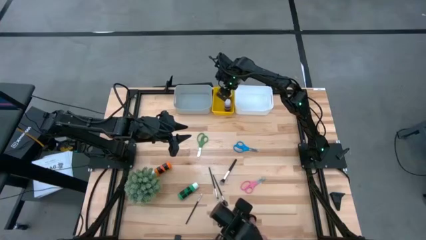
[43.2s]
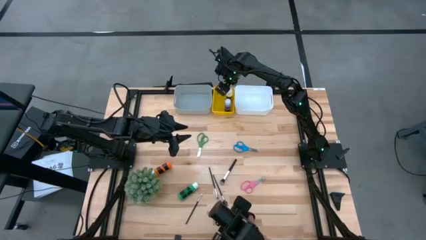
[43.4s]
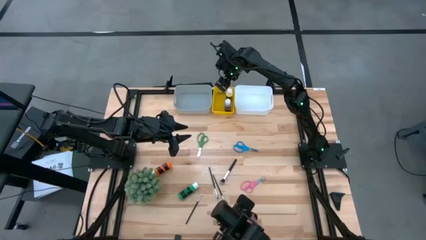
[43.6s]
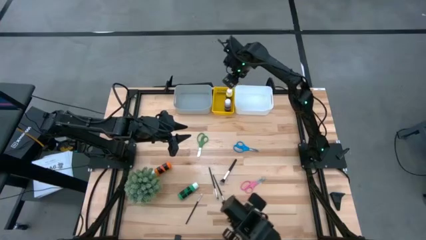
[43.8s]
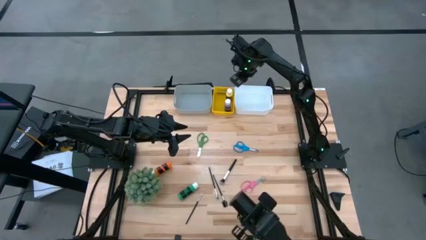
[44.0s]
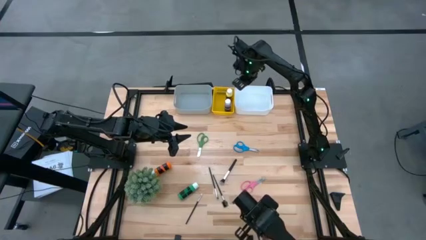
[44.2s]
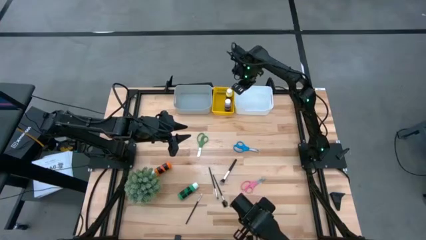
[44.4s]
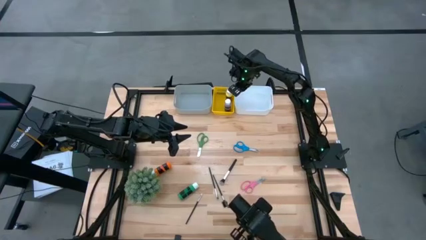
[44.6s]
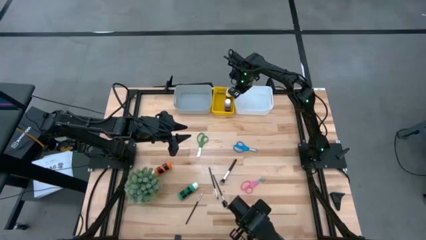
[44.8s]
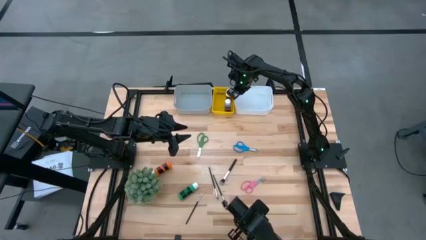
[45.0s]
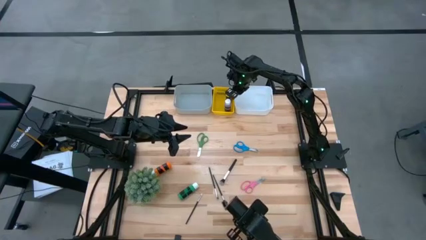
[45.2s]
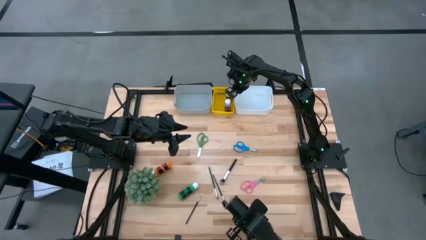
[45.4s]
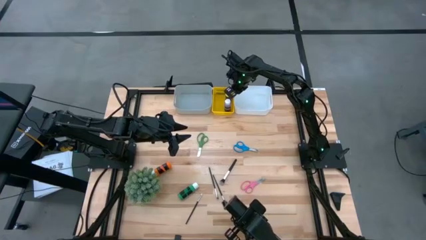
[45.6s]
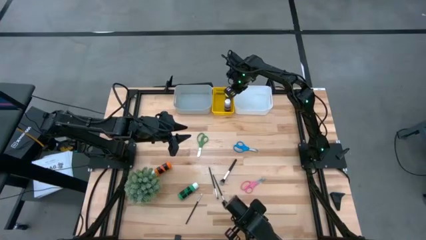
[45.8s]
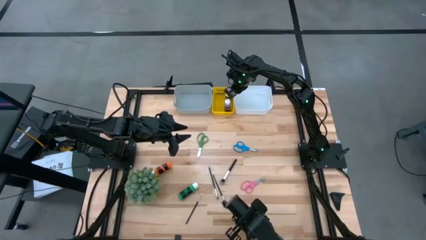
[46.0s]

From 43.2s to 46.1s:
Task: Pick & Place Paint Supplies
Adjust the white bin

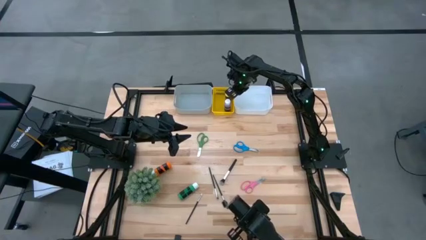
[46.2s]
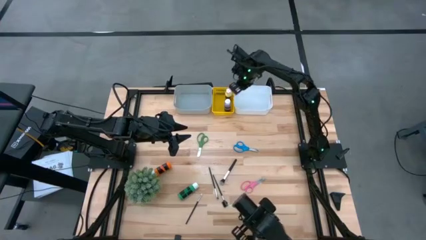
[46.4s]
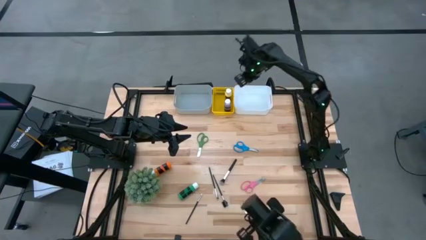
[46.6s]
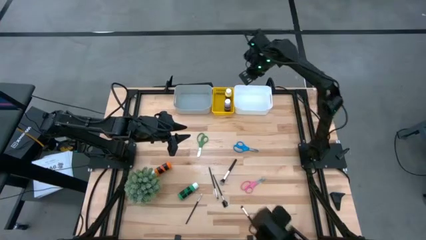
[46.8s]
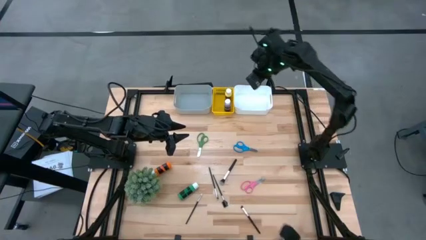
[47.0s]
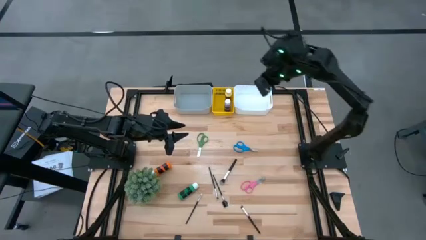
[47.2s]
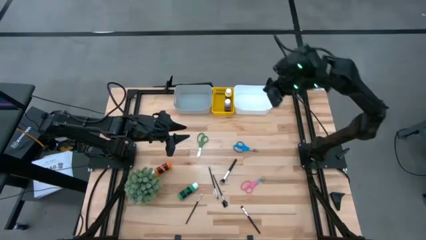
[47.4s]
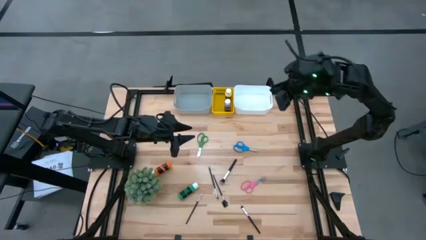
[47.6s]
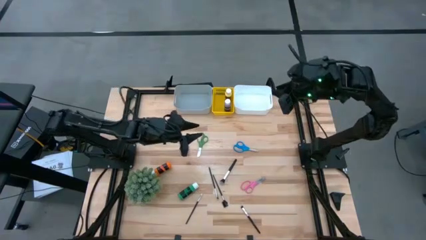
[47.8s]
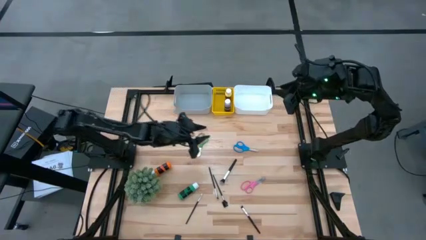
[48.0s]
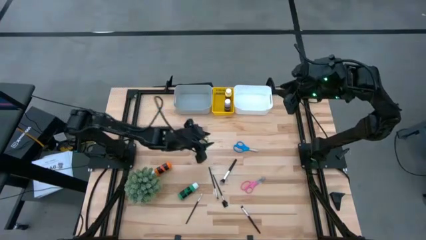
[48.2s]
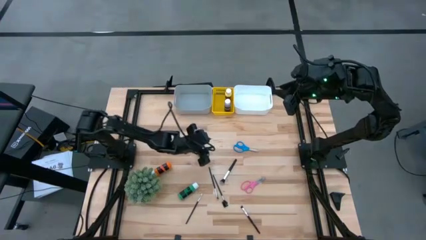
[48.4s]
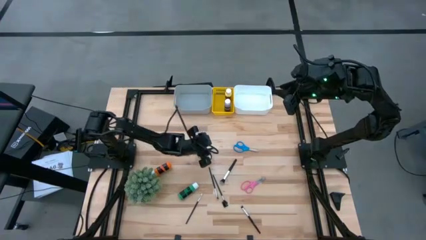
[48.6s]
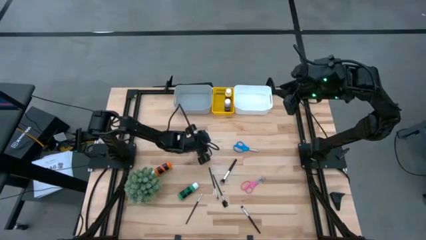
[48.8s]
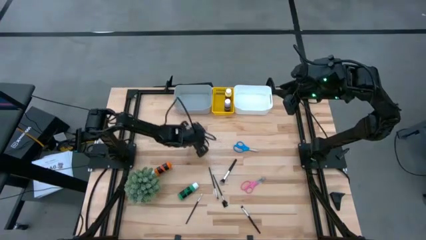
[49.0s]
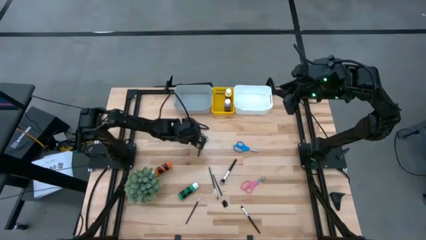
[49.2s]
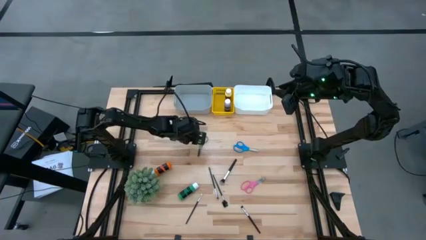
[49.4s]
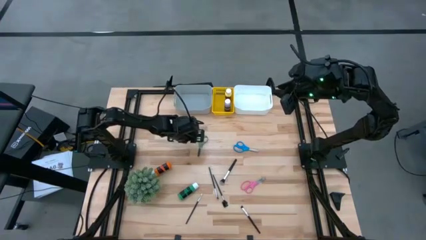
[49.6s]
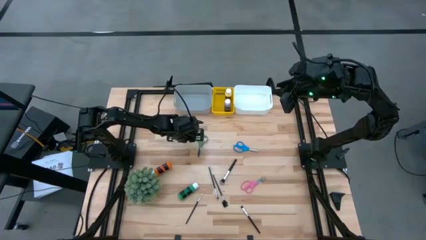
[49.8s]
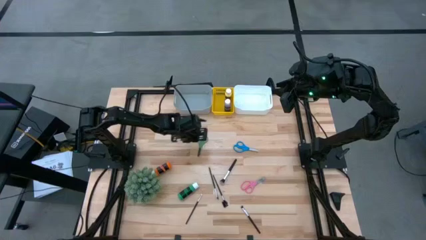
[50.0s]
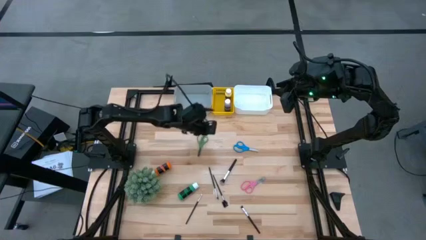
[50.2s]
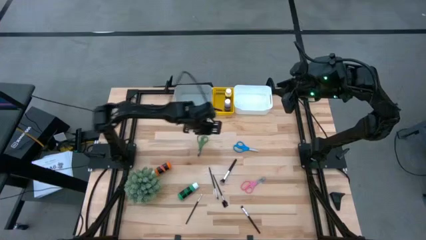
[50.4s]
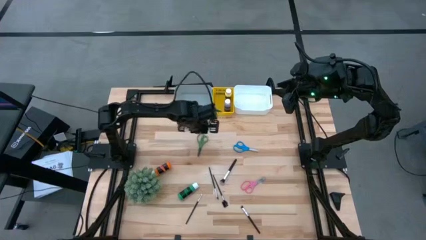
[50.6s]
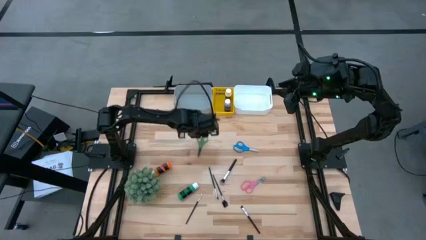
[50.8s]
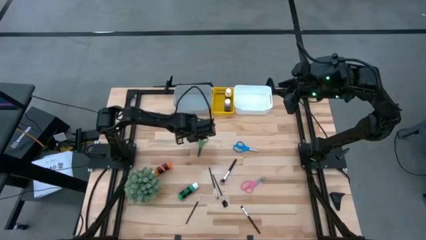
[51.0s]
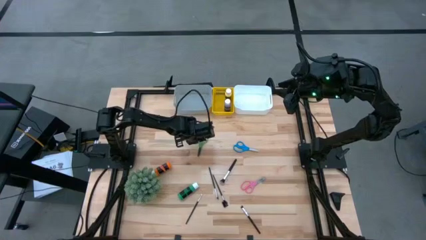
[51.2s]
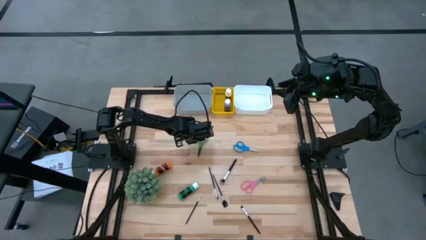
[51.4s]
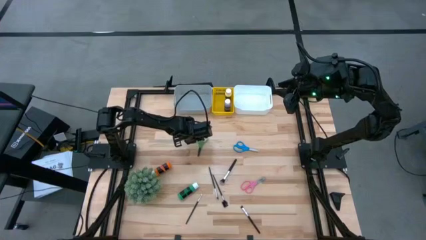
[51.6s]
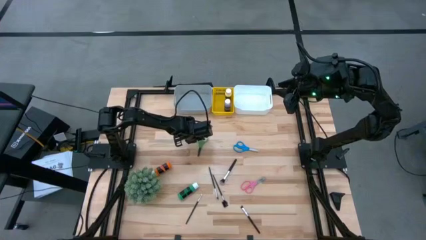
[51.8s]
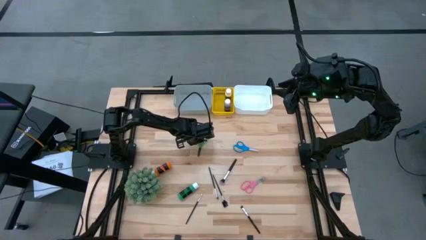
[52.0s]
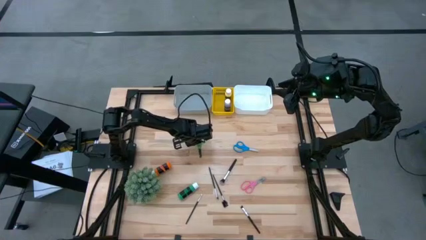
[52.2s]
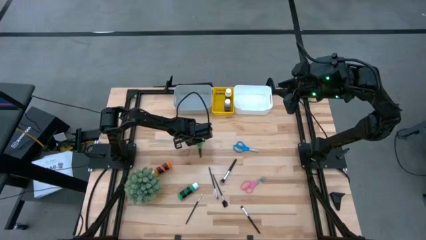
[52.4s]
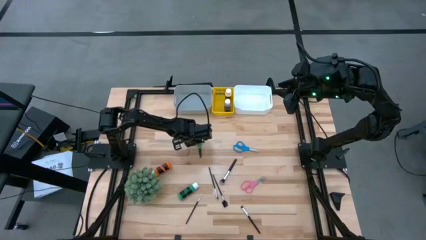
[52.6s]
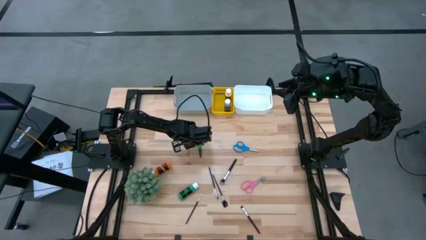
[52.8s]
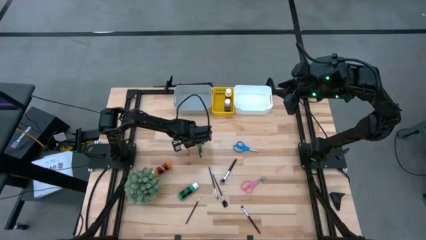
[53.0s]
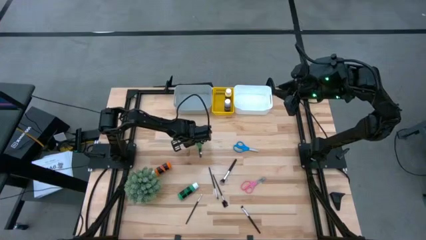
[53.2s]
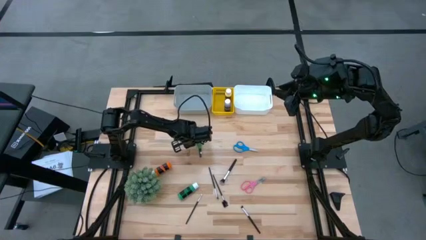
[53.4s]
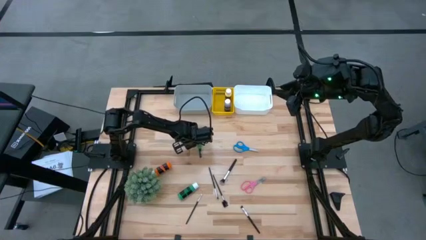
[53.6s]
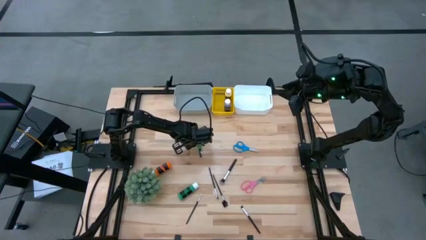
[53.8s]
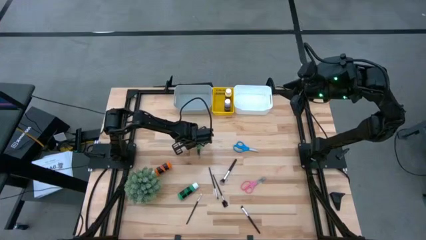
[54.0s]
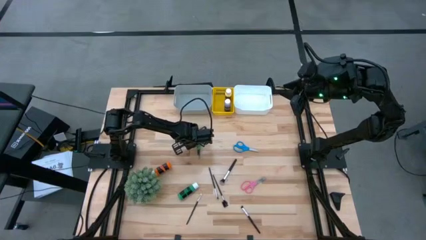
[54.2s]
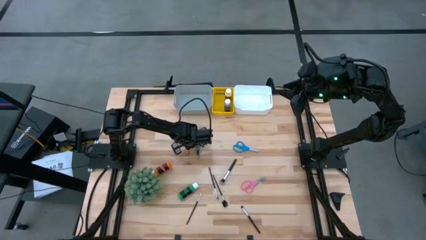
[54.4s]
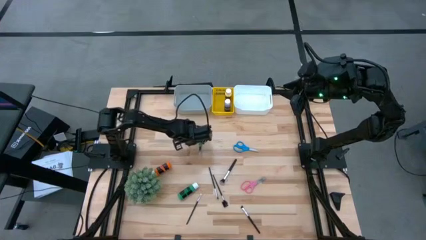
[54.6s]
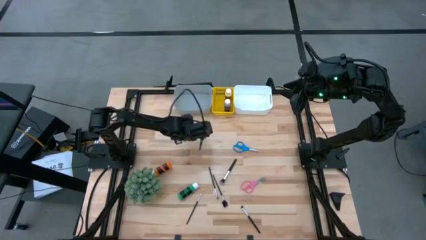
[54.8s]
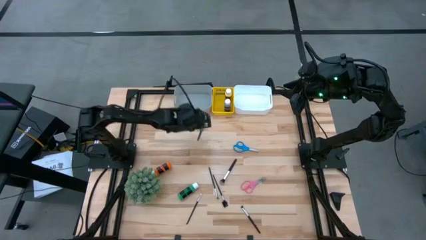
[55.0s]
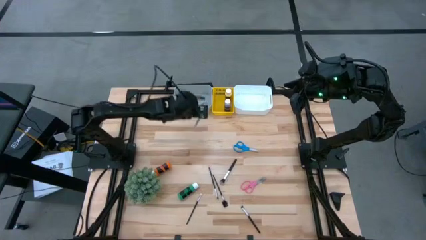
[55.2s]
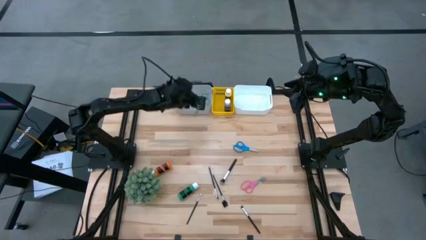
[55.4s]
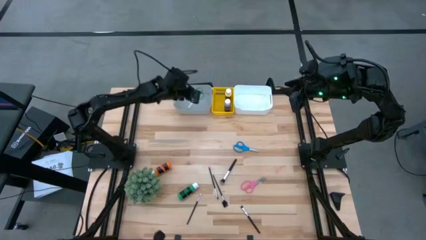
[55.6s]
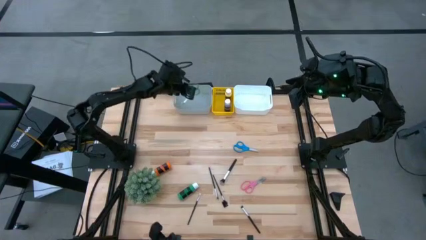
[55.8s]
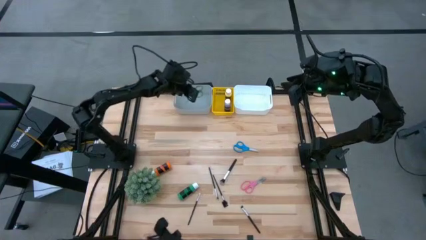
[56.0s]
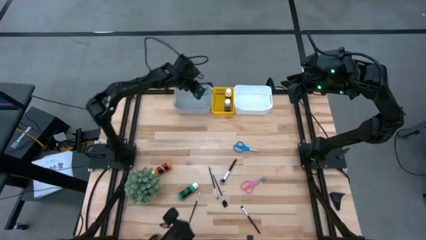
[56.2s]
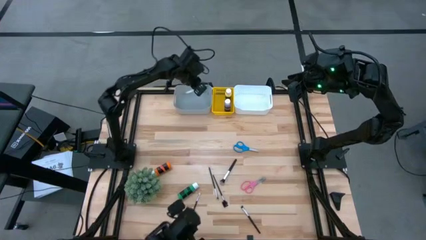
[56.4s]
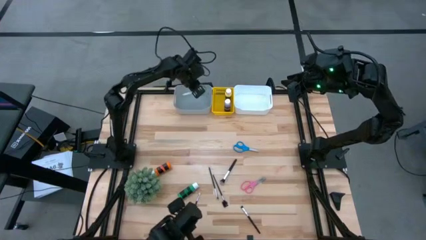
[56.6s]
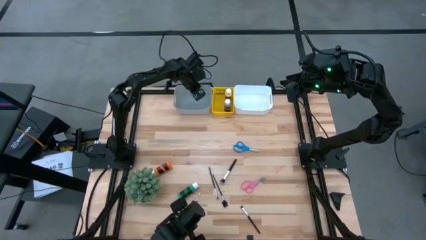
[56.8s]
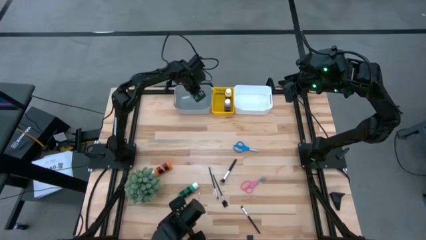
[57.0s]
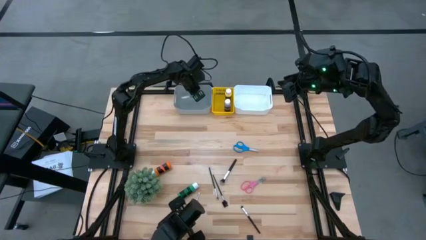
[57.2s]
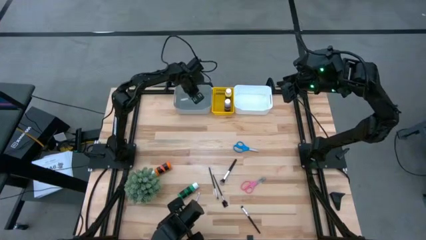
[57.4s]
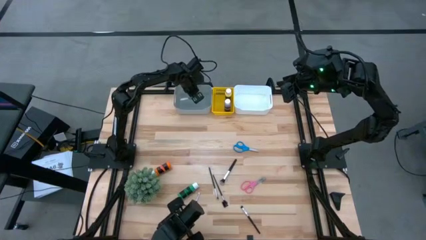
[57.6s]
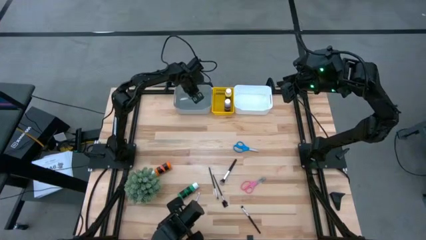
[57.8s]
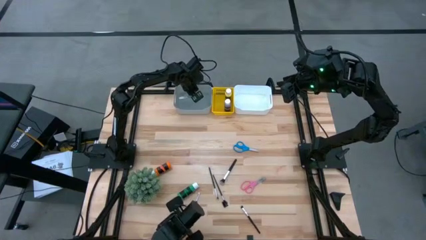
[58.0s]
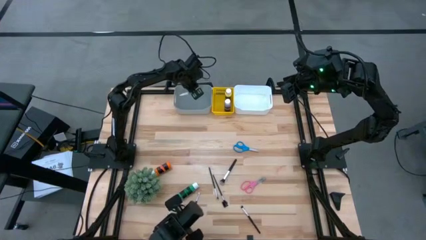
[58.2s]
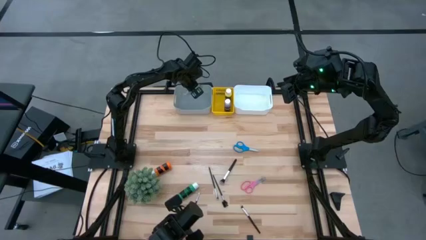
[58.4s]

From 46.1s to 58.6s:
Put the green scissors into the gray bin
